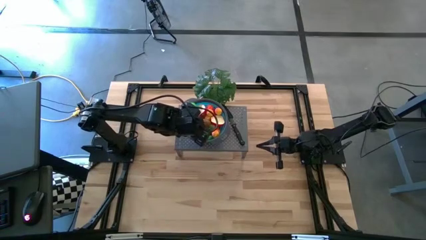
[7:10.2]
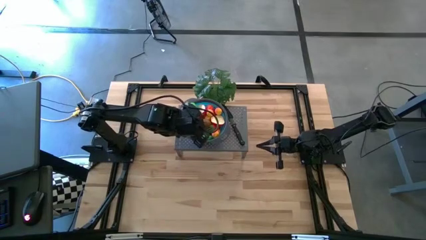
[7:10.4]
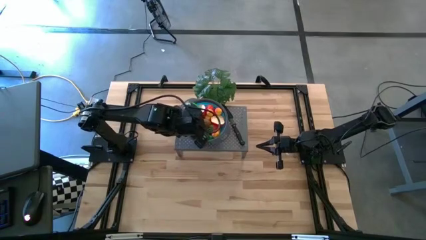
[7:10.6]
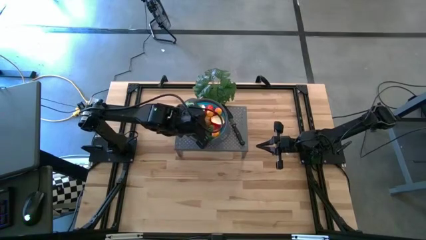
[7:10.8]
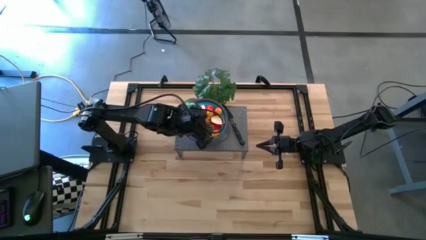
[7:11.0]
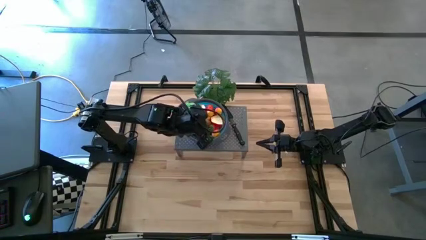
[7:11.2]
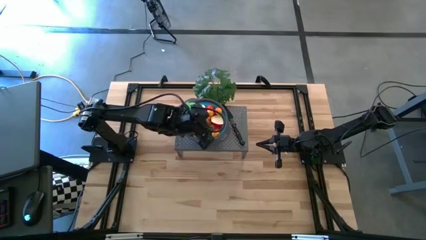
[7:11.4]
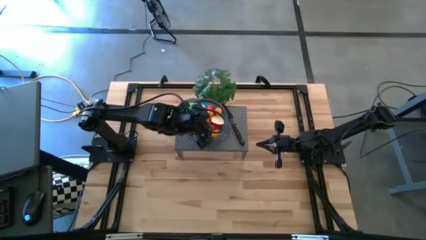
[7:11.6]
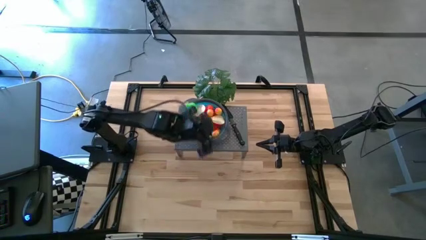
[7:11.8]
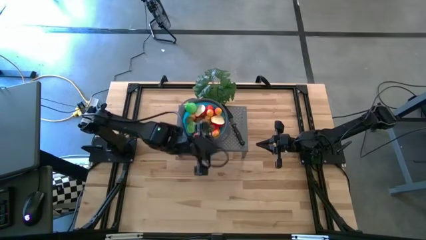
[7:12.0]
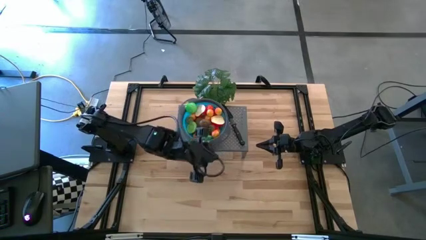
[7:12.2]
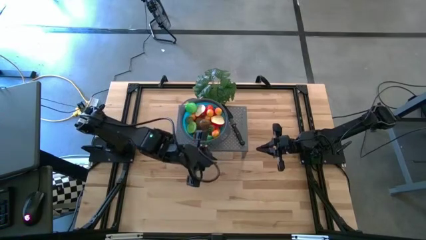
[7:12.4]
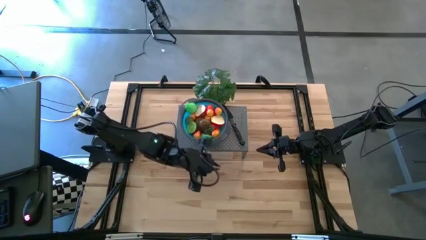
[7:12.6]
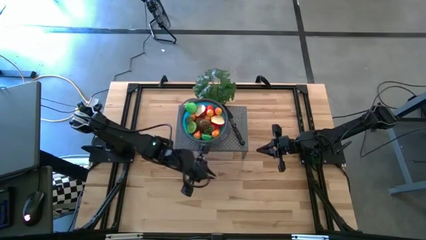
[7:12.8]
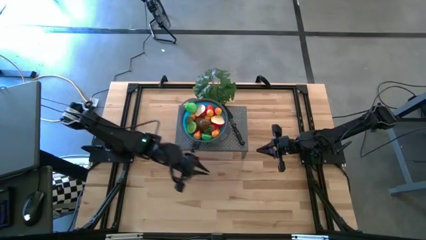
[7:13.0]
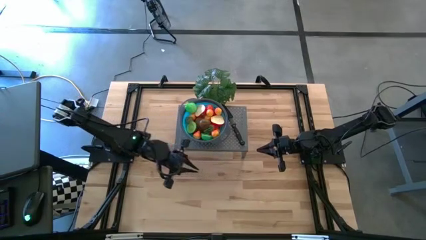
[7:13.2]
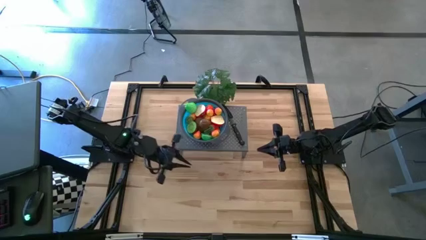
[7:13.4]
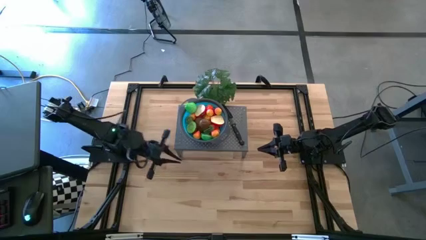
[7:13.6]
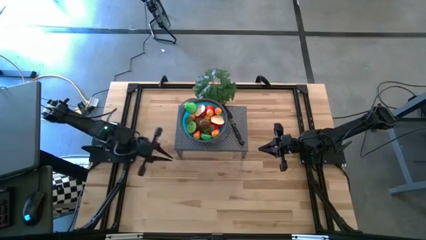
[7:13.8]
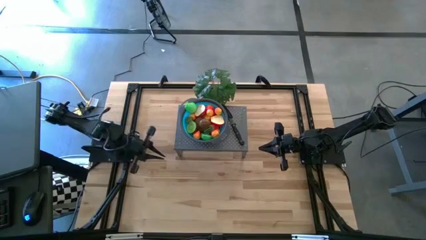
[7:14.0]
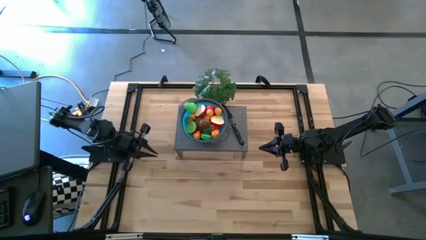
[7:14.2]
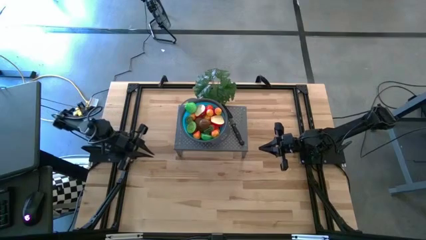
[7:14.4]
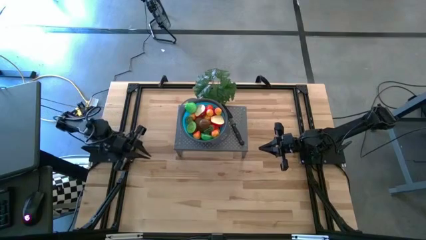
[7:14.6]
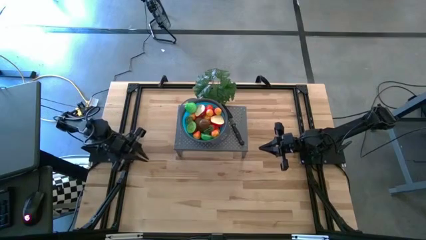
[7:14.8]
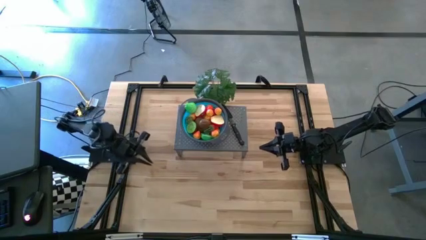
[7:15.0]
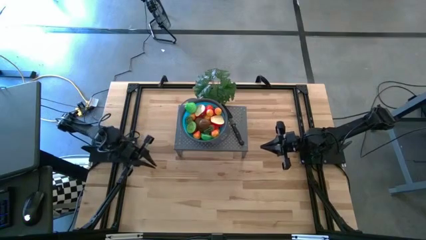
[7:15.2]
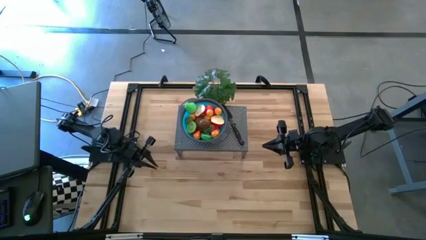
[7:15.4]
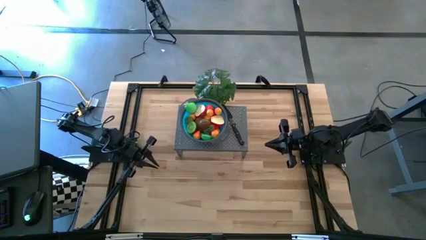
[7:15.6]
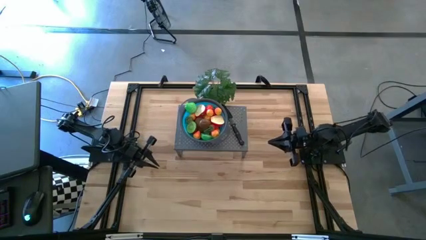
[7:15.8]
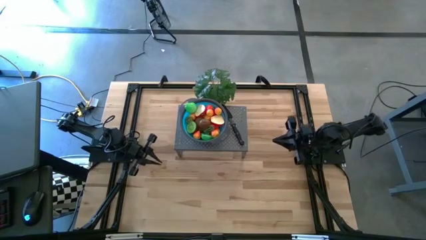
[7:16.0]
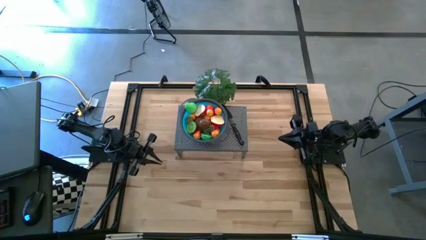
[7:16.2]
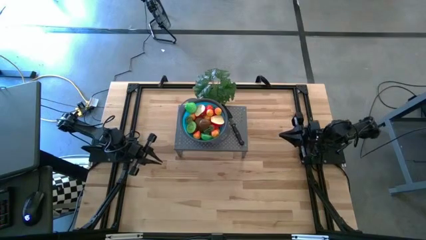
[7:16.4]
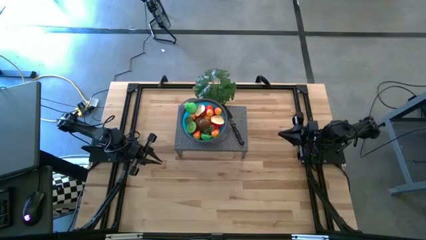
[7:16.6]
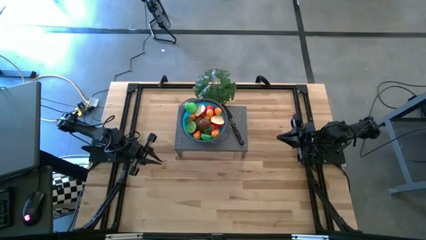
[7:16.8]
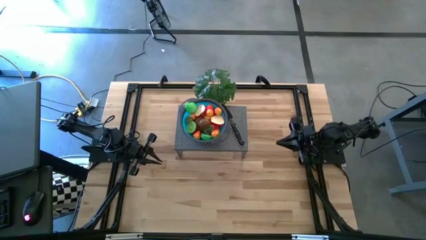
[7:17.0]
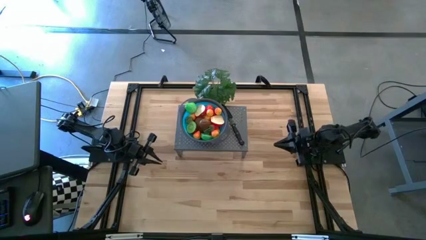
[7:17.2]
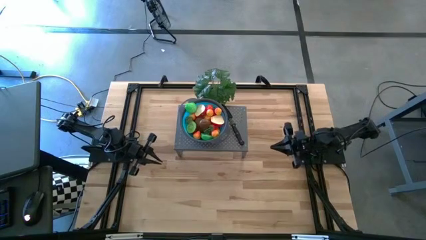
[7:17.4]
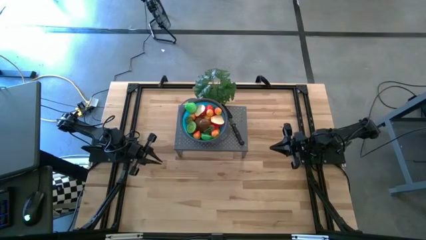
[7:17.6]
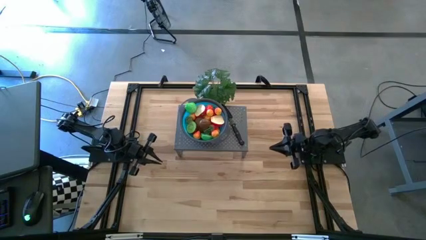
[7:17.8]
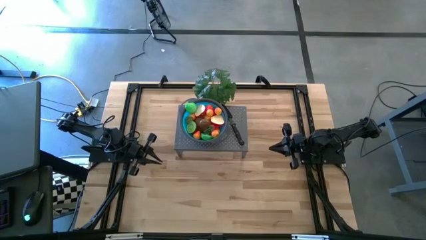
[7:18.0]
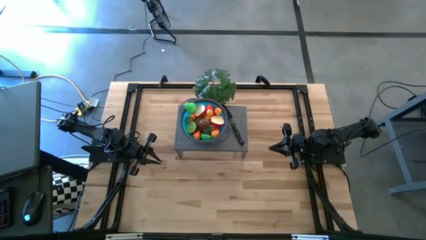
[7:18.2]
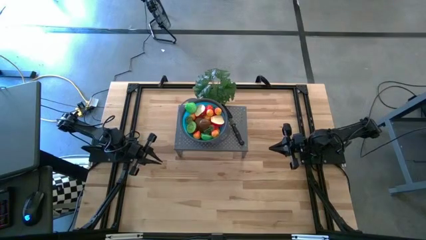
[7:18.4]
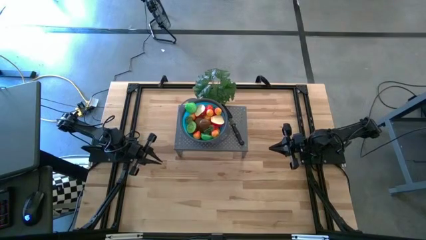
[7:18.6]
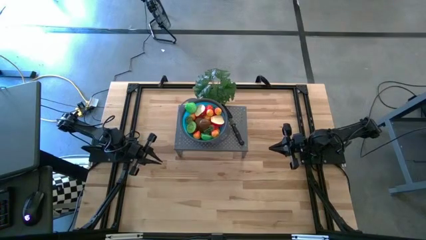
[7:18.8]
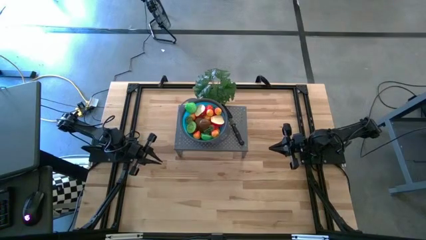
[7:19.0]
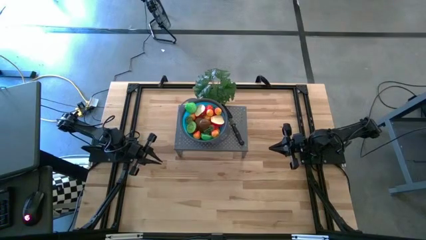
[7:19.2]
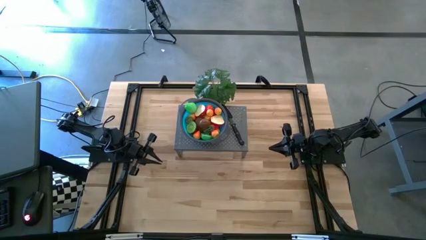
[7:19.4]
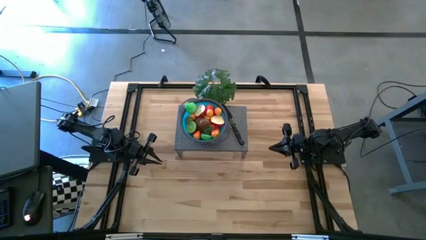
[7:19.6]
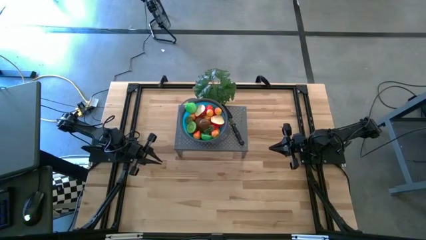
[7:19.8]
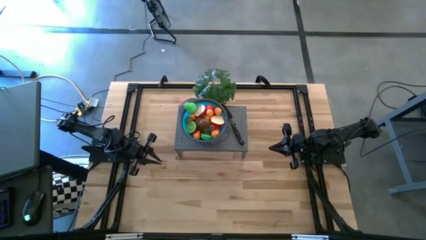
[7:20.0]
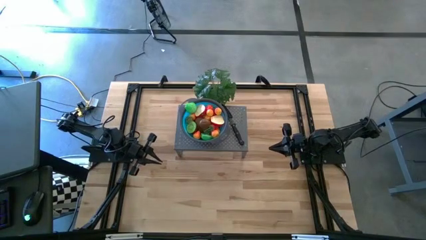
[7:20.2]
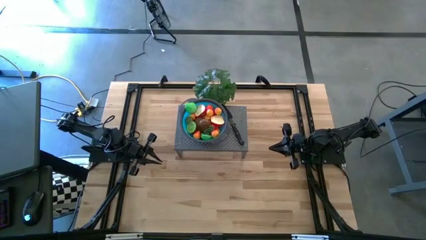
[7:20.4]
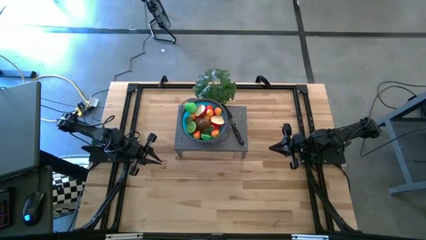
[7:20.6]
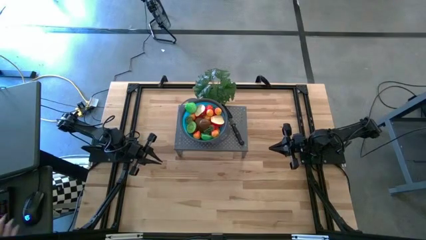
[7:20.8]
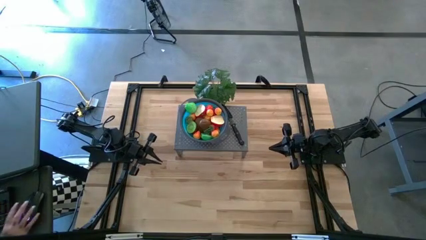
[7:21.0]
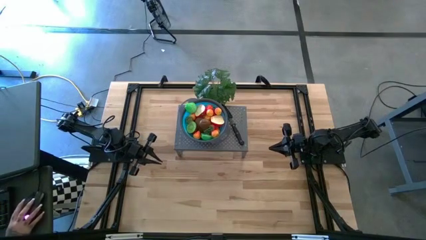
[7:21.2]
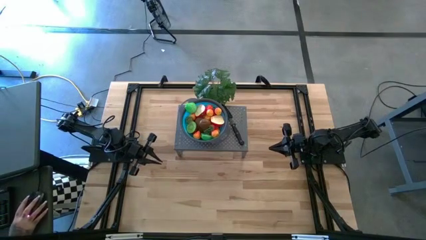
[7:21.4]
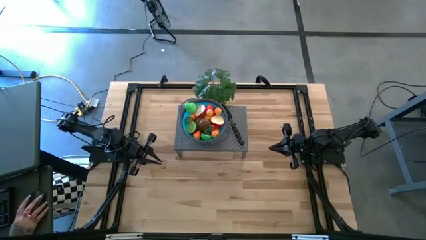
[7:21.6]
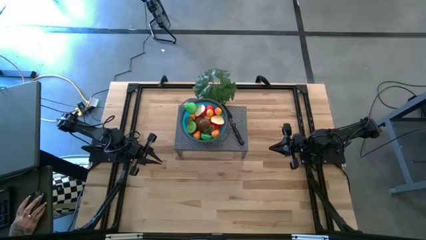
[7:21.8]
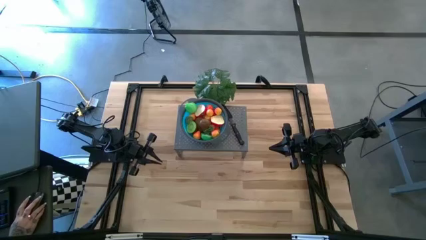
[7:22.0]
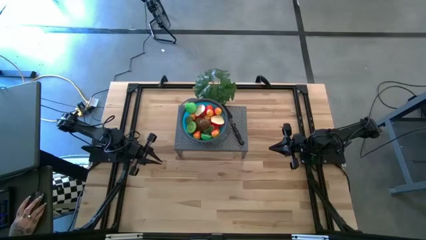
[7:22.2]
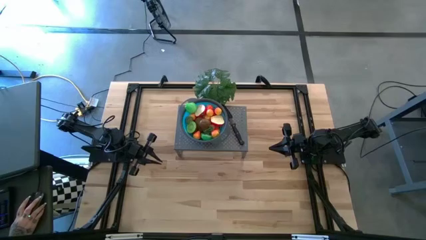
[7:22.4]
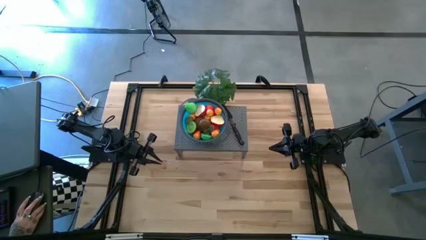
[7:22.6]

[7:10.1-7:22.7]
Task: Pick & Place Fruit
Return to Home Position
